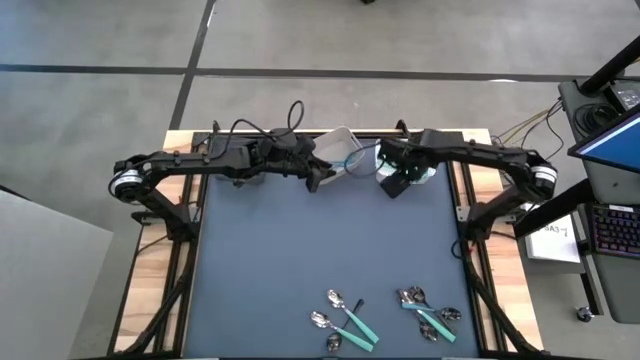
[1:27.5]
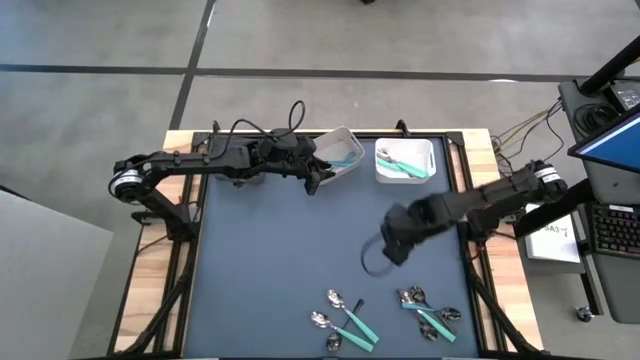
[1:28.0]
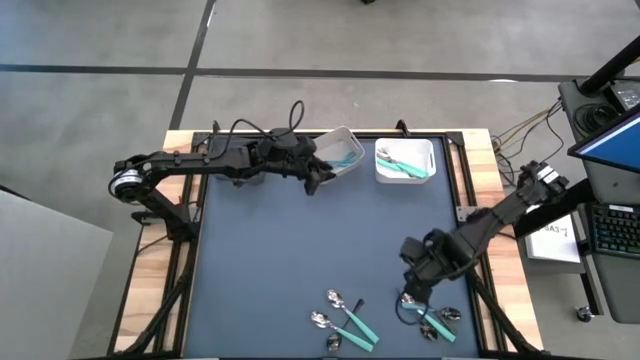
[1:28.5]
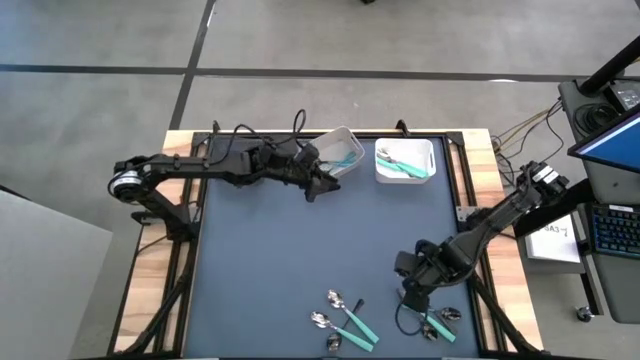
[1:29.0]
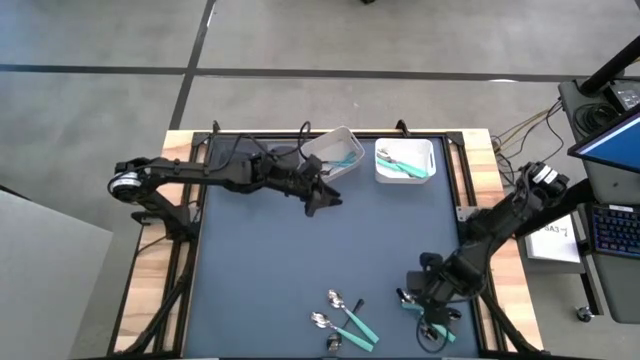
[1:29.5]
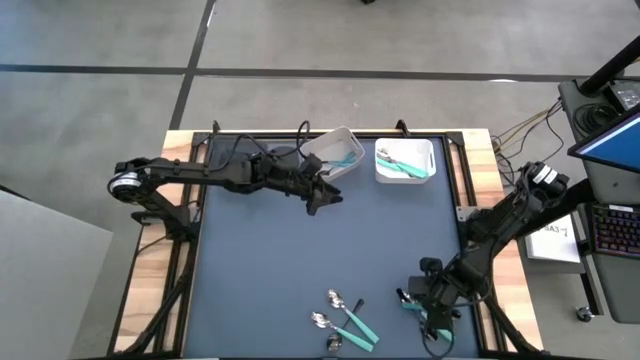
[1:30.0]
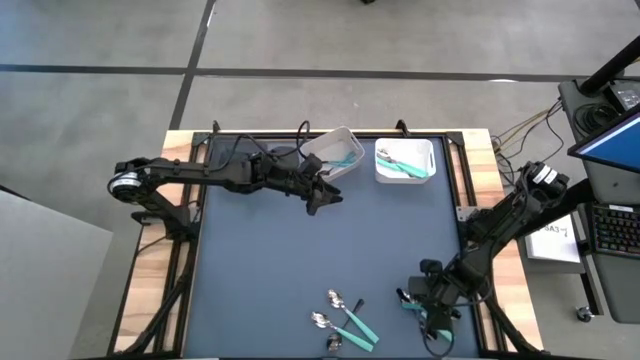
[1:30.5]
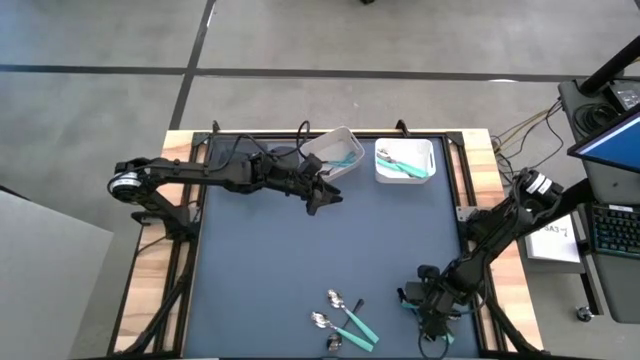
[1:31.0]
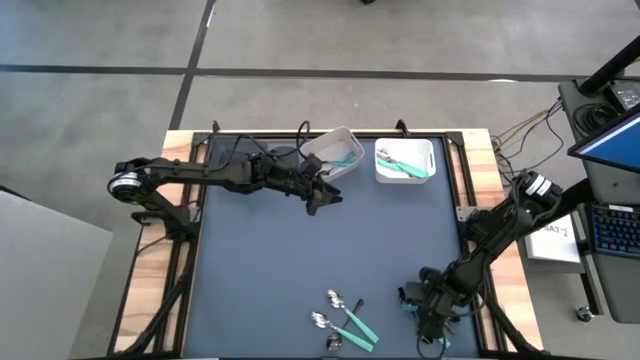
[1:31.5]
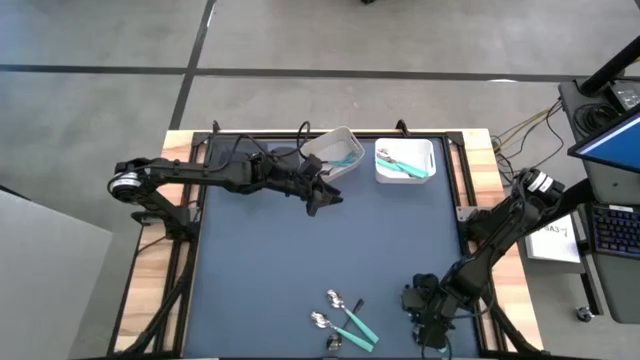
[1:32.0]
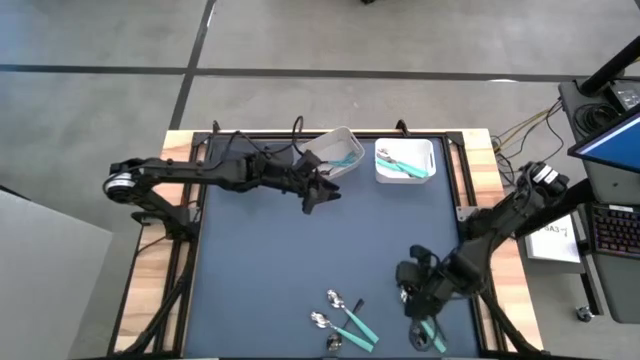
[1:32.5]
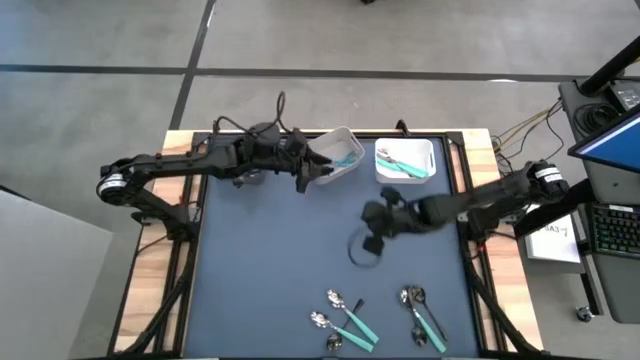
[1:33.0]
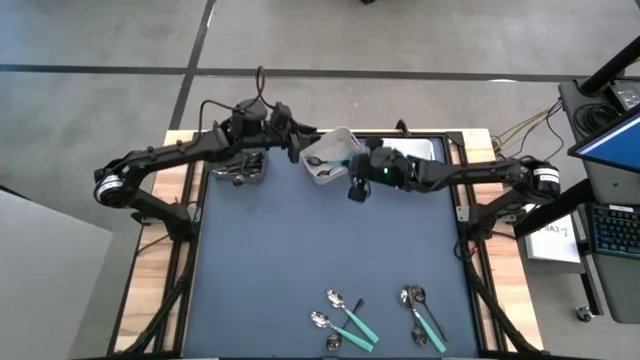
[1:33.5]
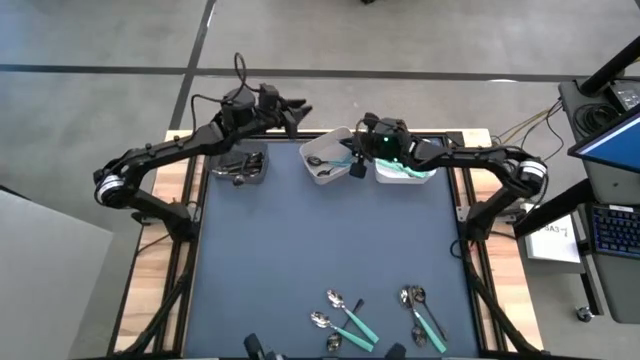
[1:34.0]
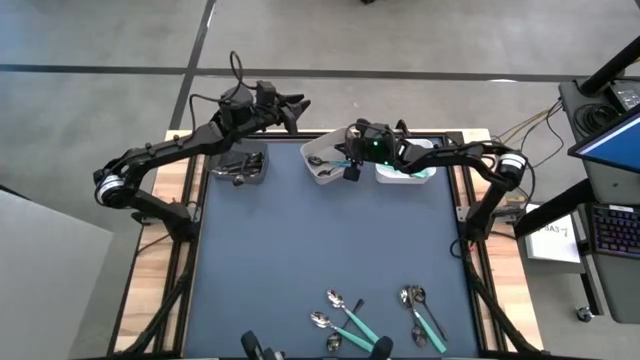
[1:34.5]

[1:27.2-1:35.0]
Task: Sort silverware by color (type)
Put the blue spoon into the gray bin

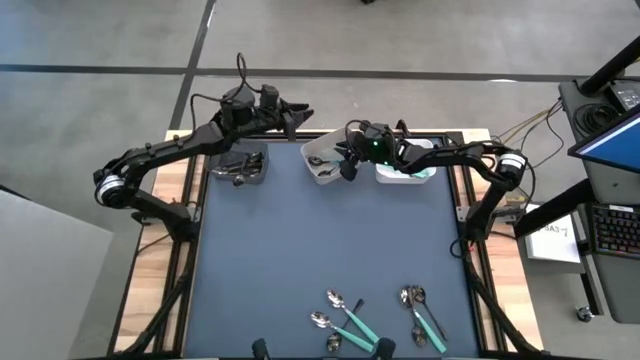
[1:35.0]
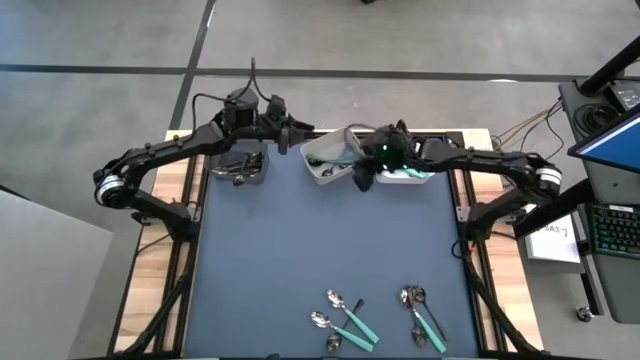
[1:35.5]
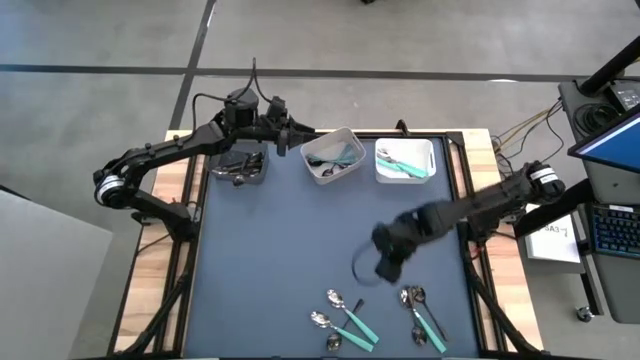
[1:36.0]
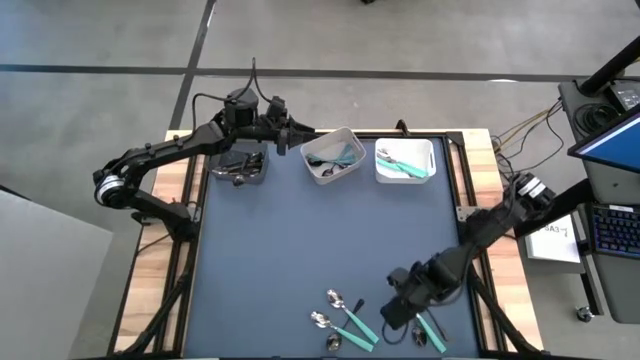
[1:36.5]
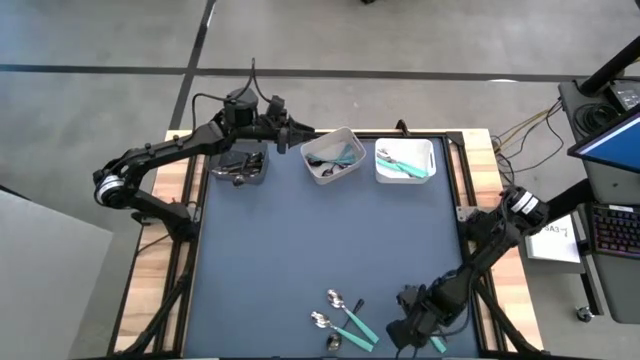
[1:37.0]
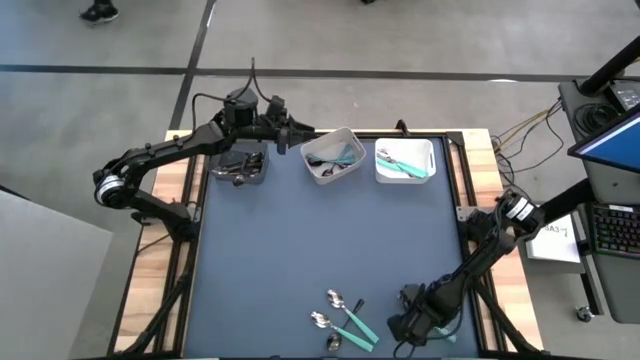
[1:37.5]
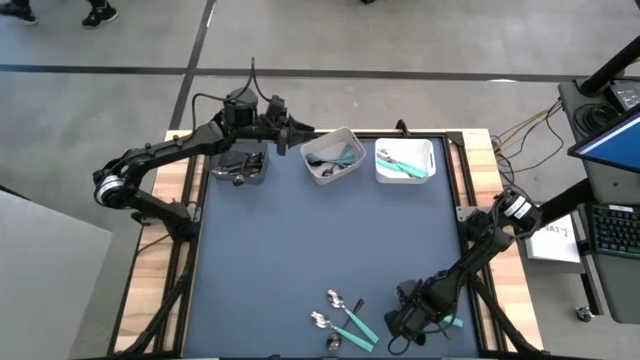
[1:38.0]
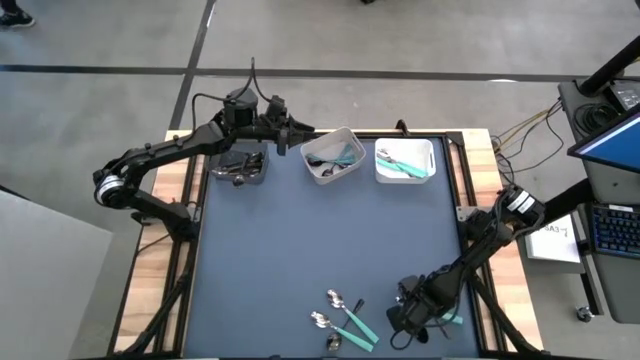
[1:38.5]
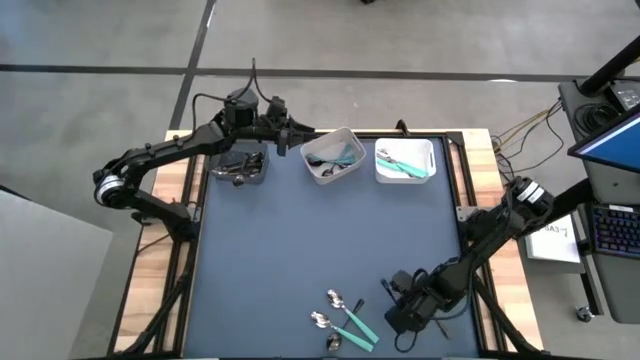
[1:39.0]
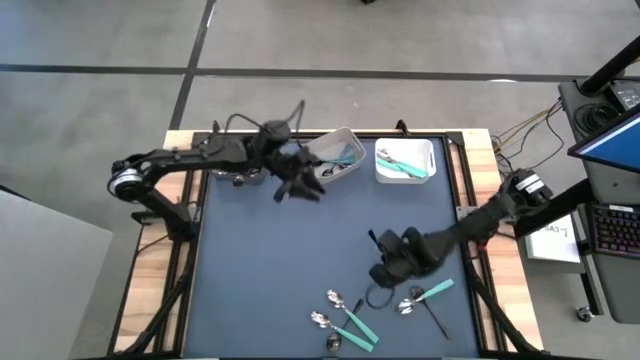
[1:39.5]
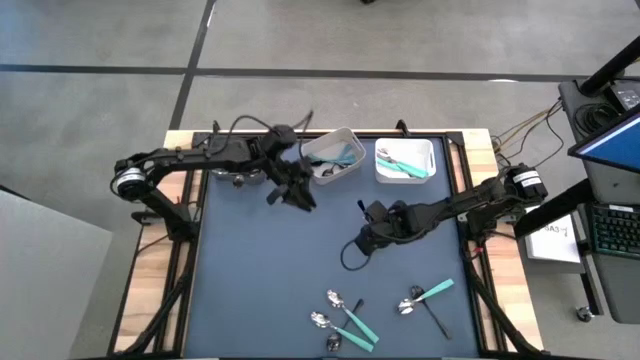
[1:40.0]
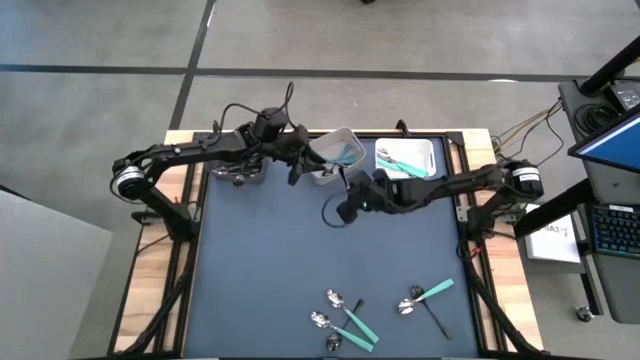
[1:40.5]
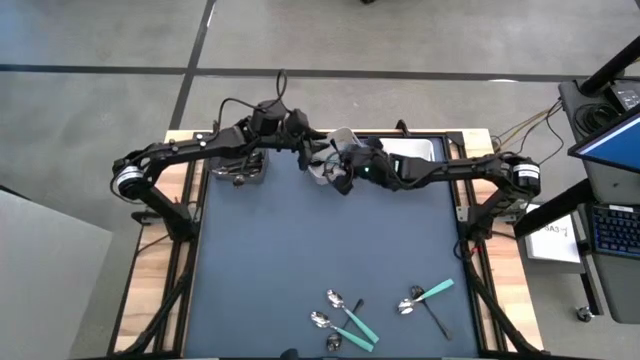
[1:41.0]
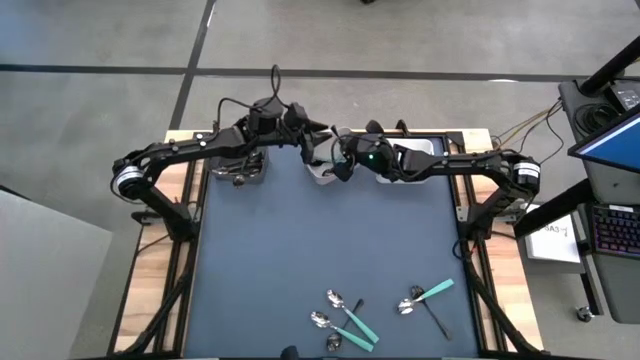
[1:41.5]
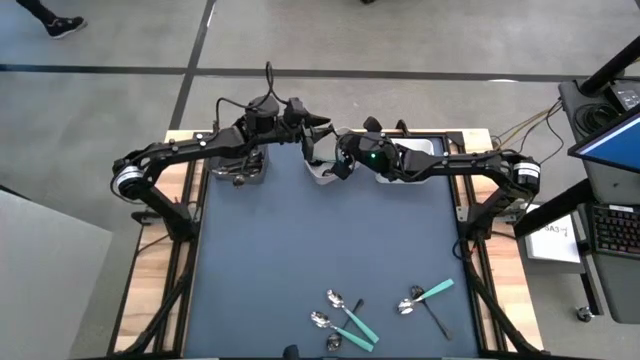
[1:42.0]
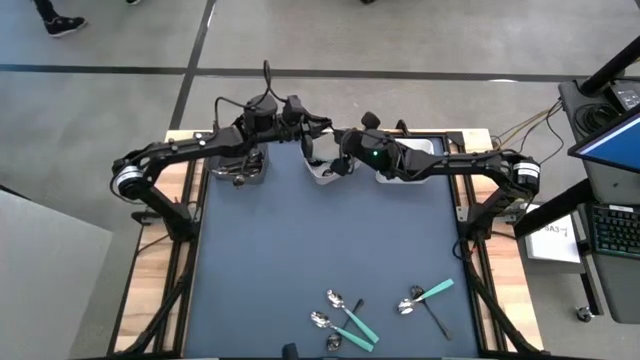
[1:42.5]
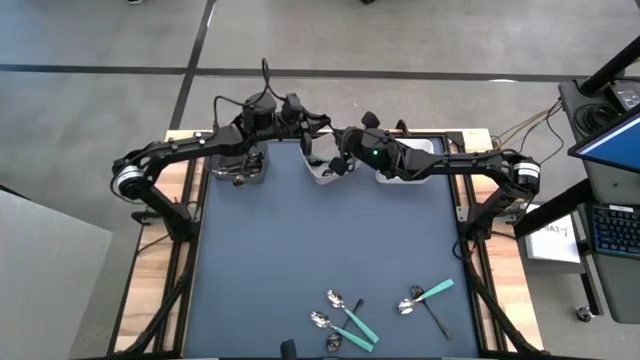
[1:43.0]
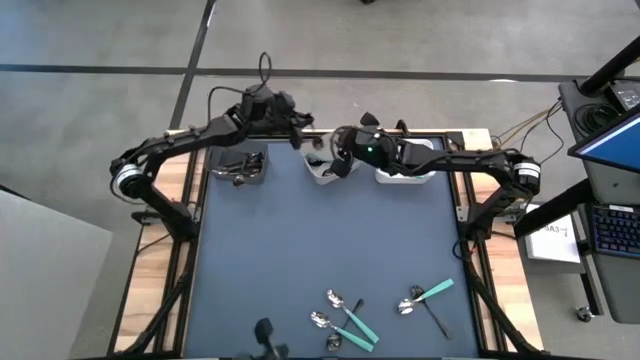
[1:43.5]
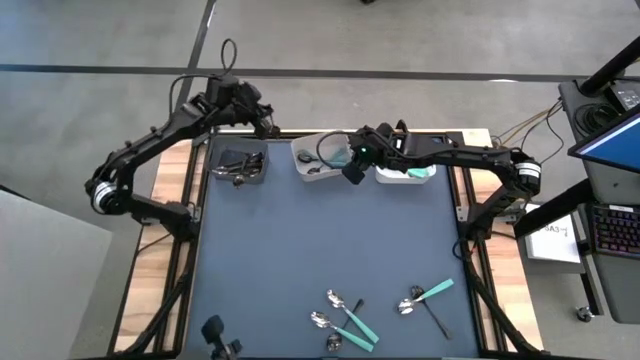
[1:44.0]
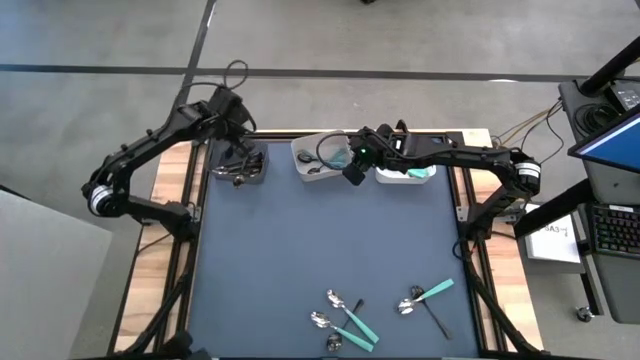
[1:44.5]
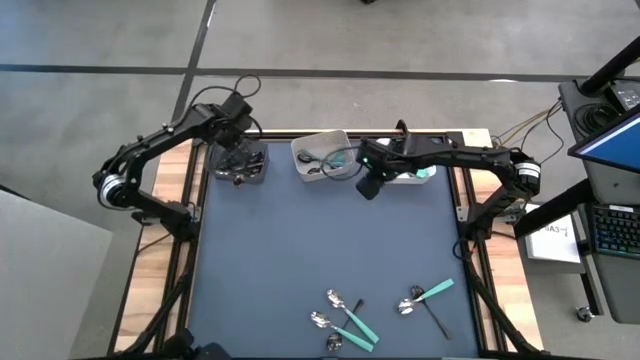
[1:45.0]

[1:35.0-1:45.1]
Put the black spoon into the black bin

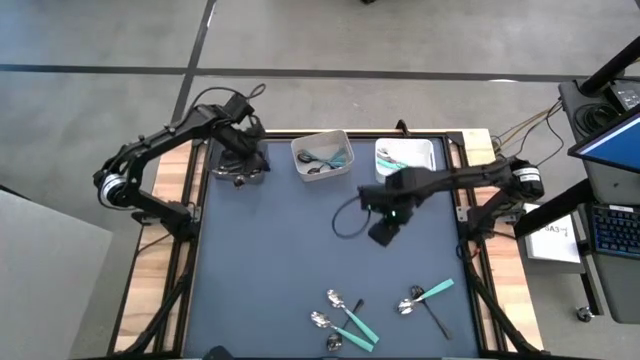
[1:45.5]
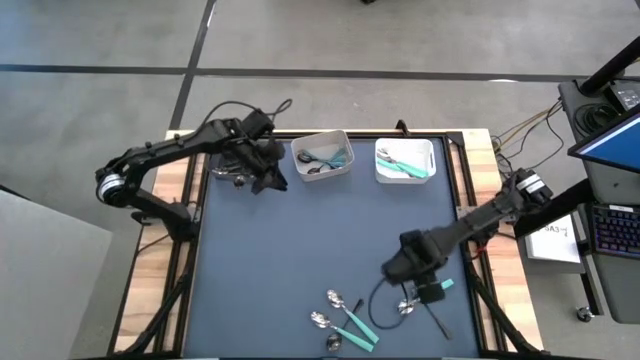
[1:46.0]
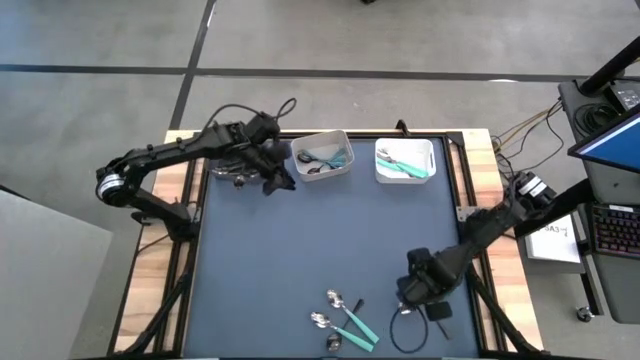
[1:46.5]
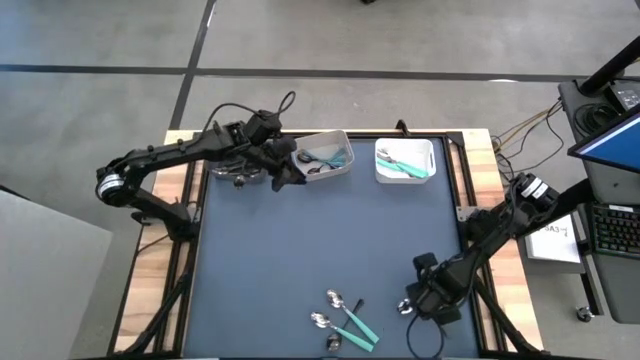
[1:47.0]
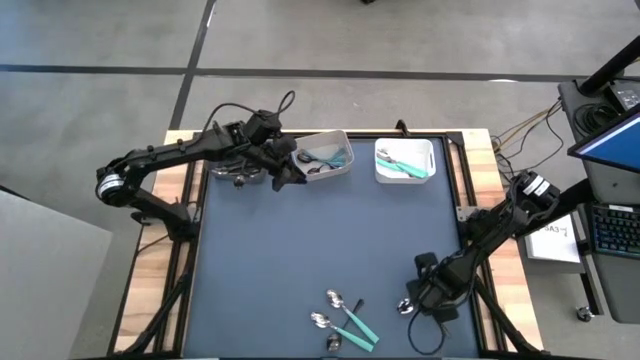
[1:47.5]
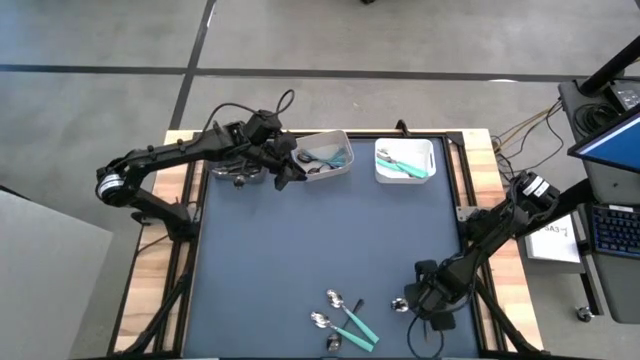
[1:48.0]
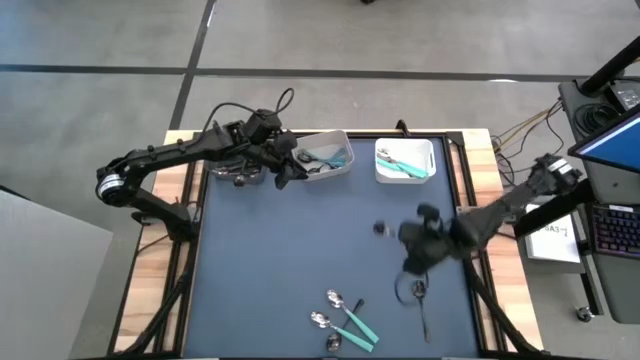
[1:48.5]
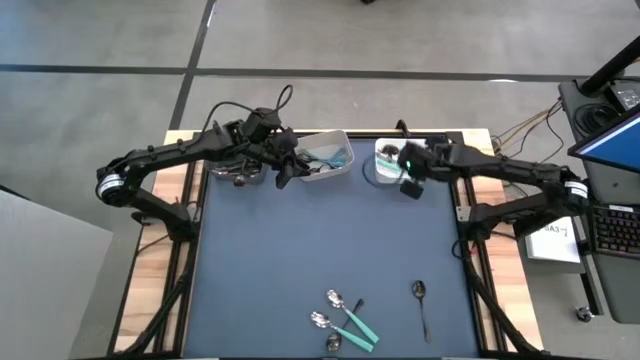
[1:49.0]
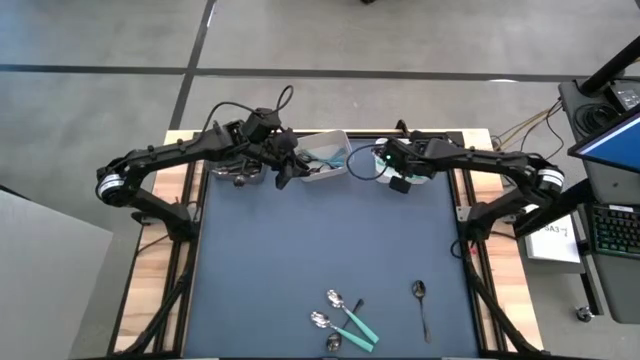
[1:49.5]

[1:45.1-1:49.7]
Put the light blue spoon into the white bin
